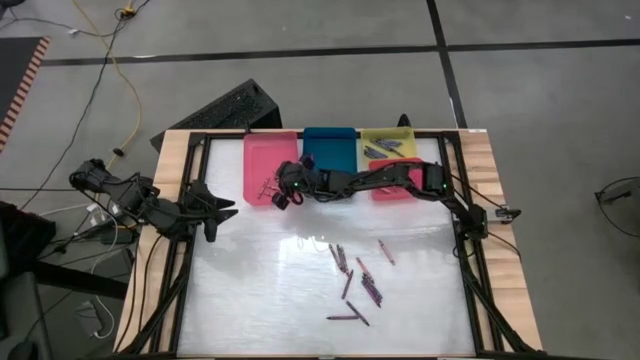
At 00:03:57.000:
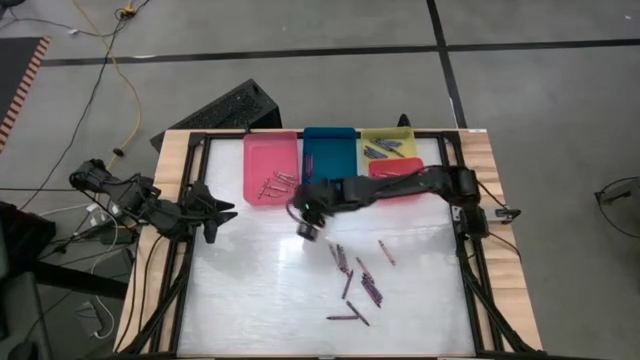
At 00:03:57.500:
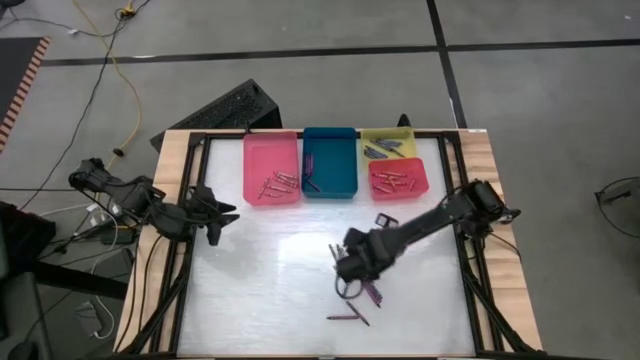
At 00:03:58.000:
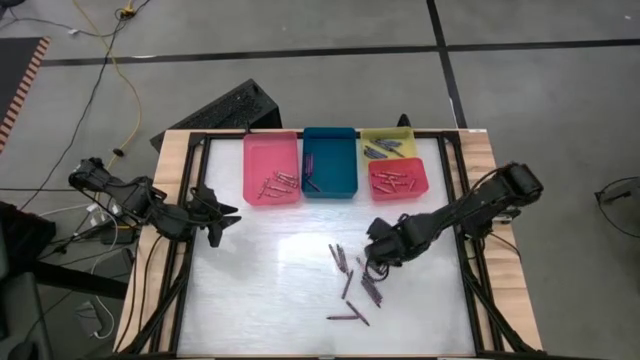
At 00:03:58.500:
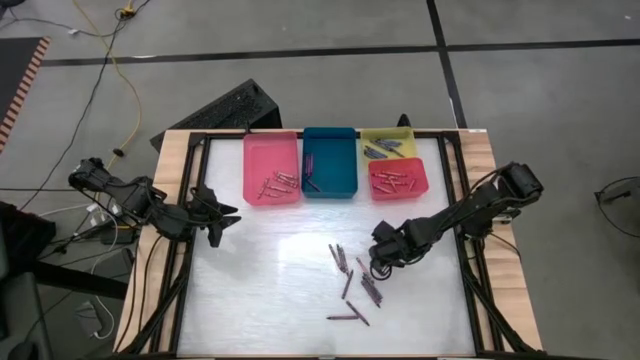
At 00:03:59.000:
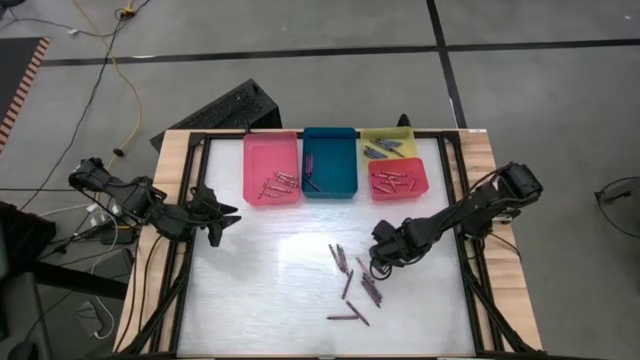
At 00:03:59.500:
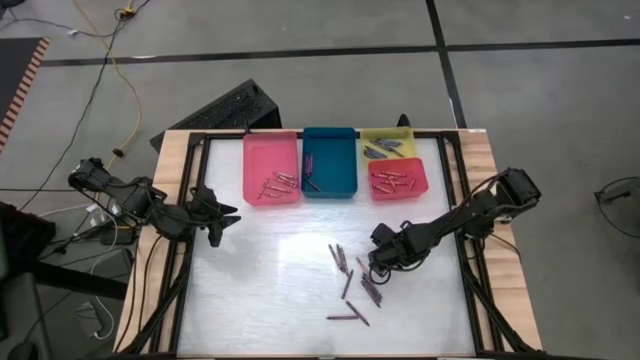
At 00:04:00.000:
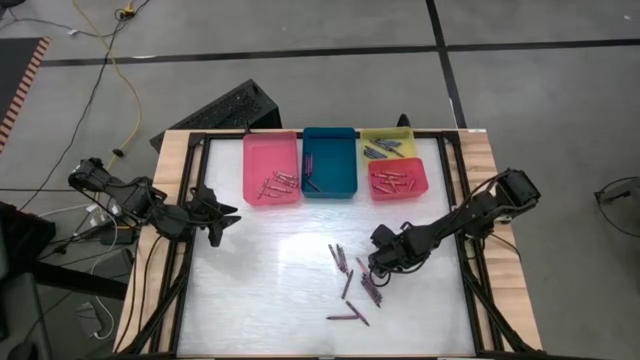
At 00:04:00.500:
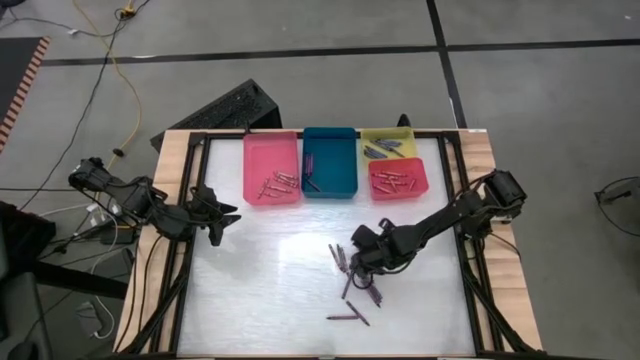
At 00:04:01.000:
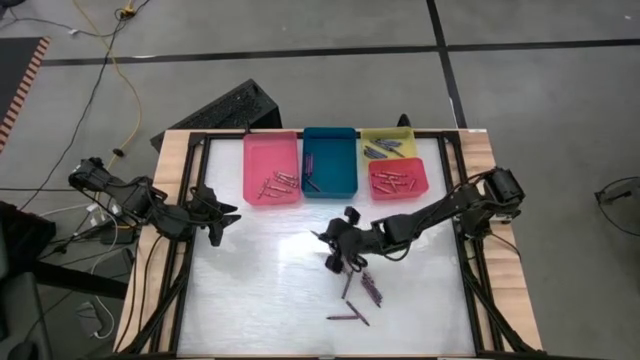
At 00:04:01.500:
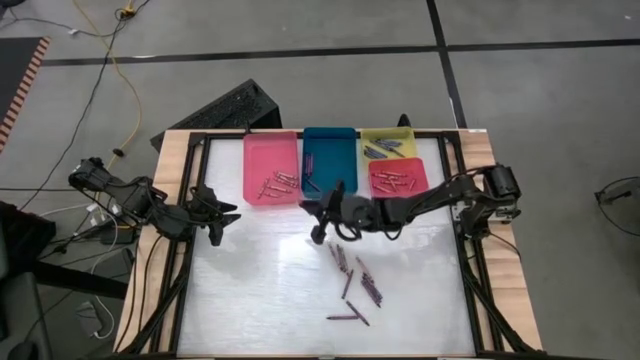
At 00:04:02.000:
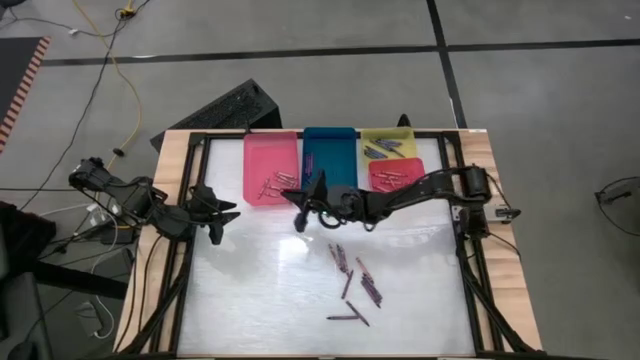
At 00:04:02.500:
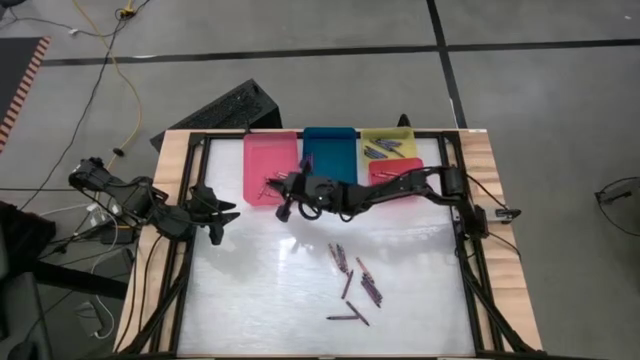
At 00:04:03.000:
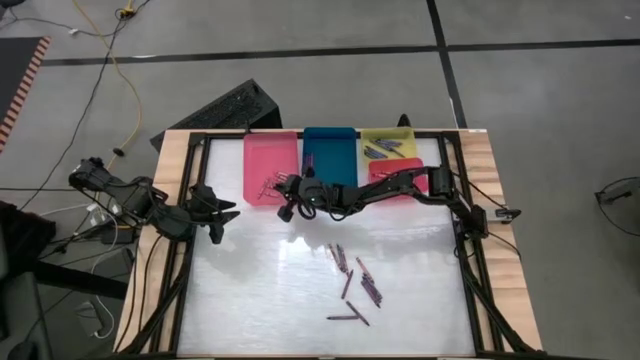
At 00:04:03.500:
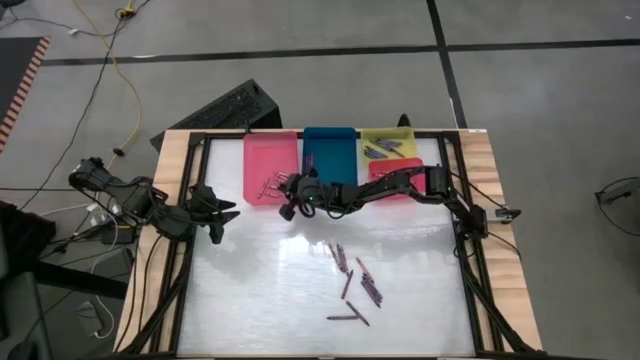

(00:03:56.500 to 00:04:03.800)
Task: Sort crayons
Put the pink crayon into the pink bin

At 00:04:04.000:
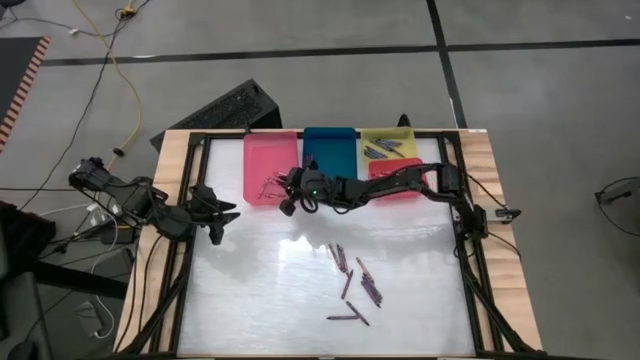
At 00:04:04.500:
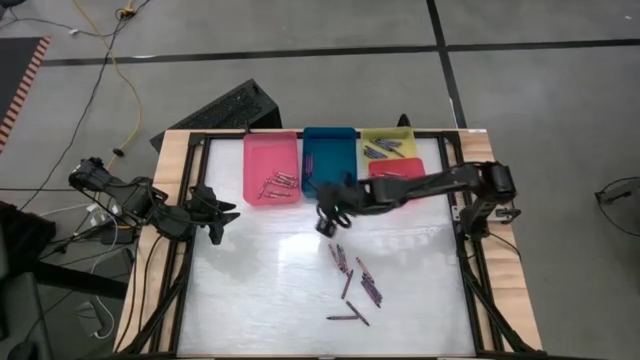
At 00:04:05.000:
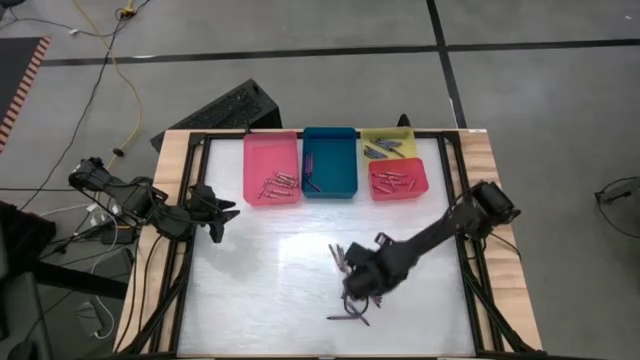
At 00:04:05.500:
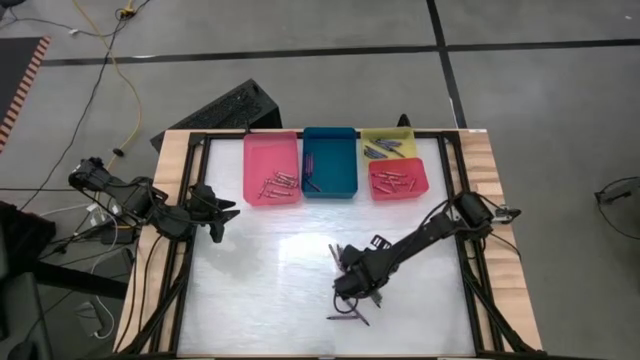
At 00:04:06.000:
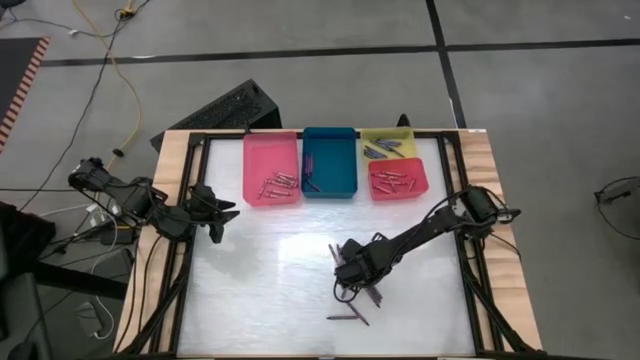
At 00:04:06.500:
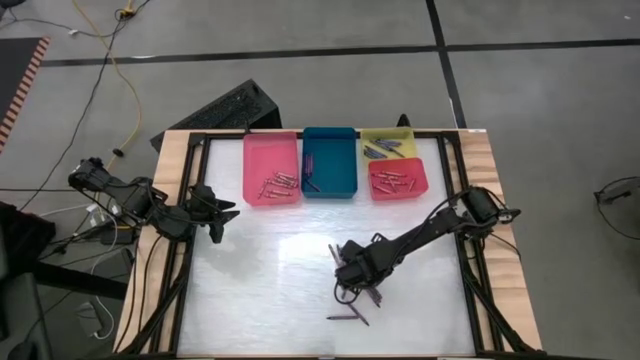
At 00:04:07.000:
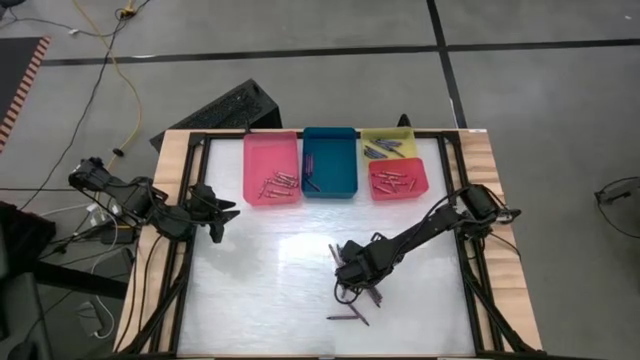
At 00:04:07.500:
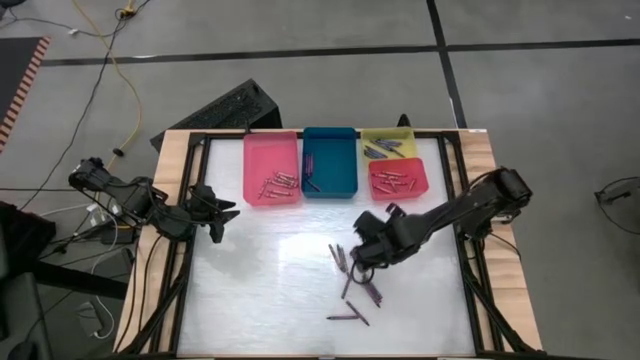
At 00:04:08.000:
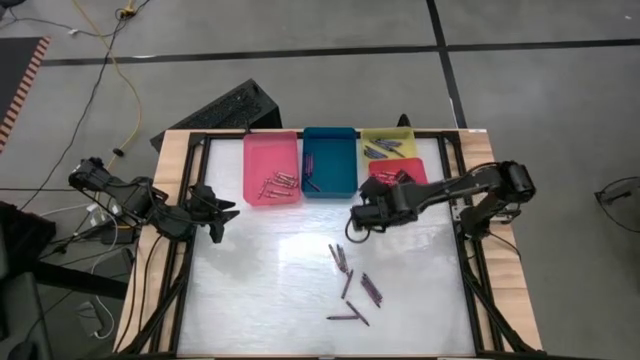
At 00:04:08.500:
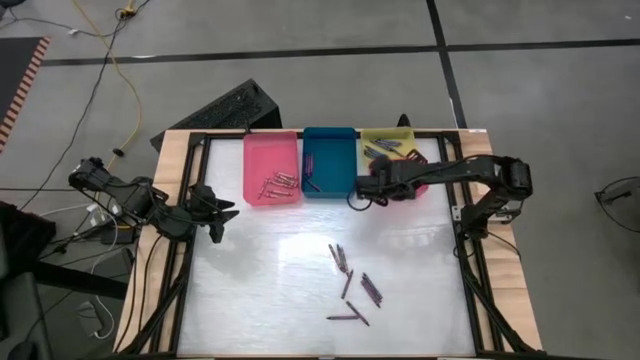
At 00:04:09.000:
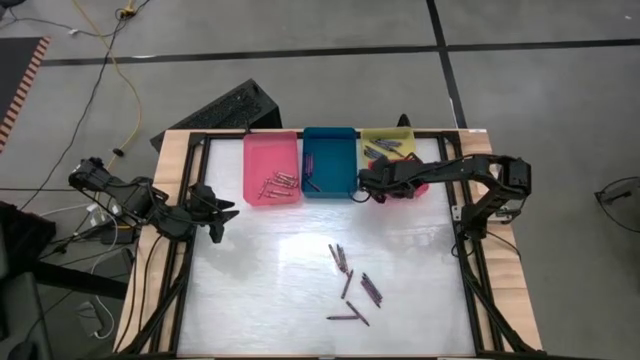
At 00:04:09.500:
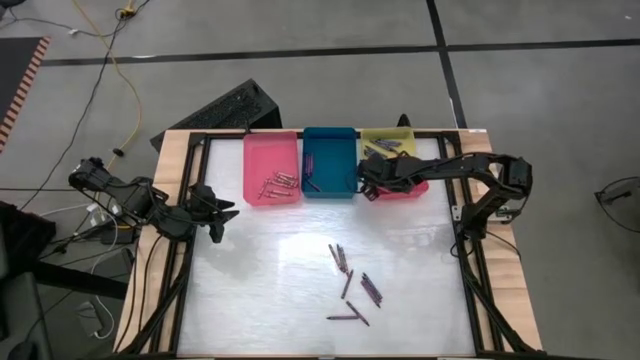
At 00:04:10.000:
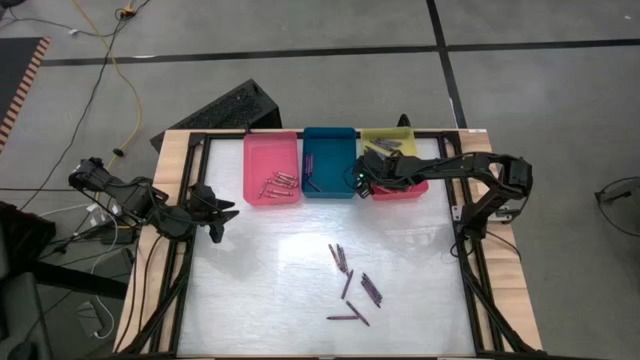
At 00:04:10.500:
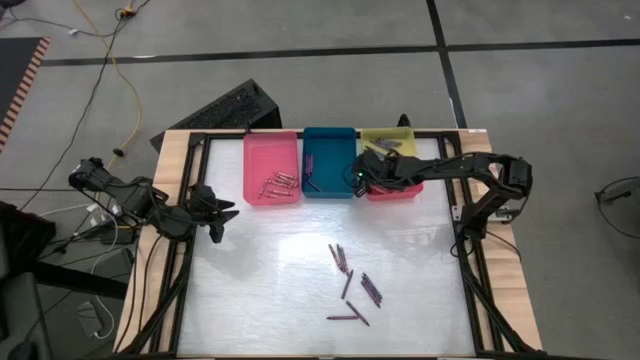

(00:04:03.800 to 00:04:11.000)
Put the red crayon into the red bin

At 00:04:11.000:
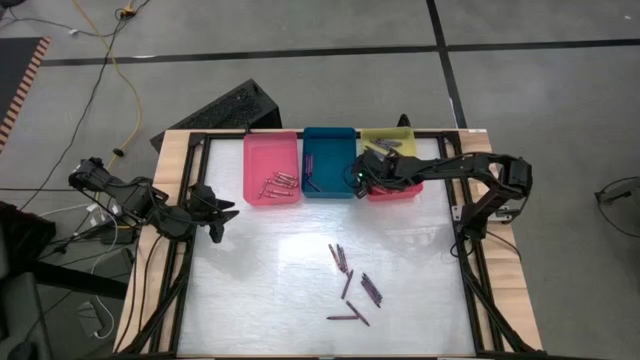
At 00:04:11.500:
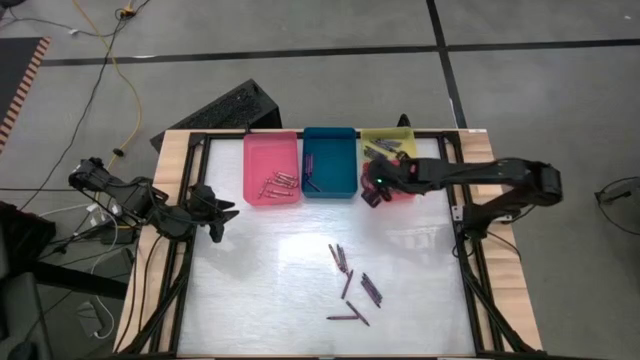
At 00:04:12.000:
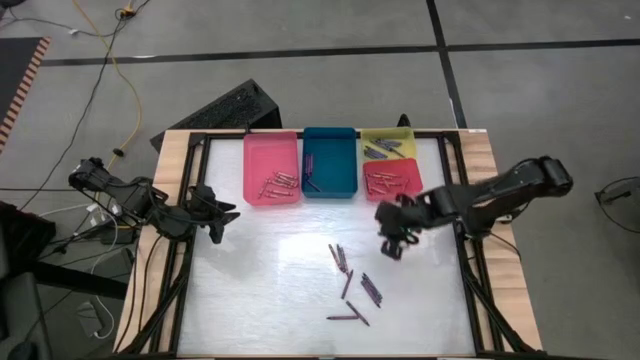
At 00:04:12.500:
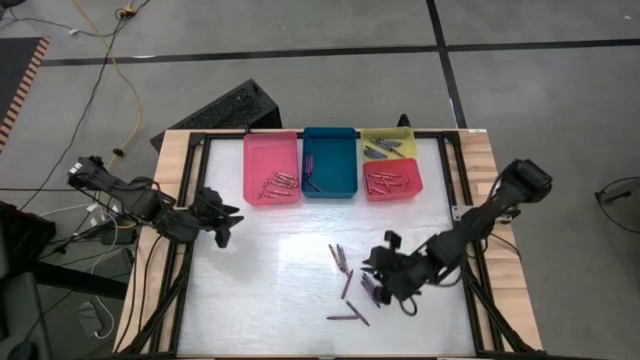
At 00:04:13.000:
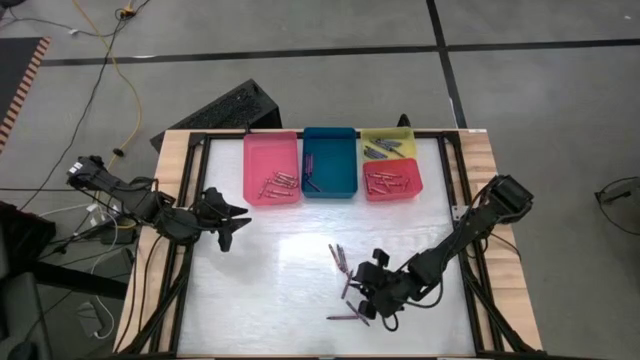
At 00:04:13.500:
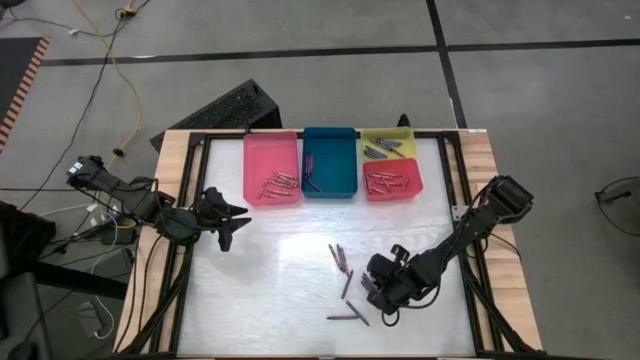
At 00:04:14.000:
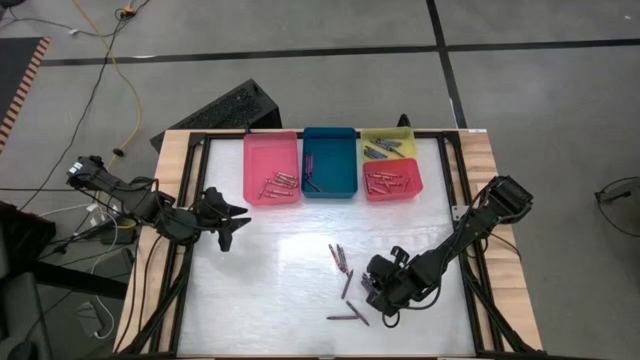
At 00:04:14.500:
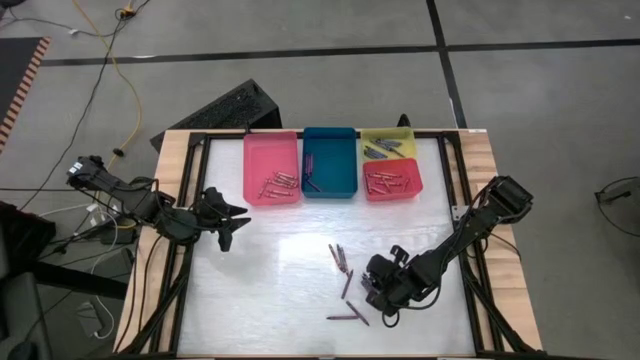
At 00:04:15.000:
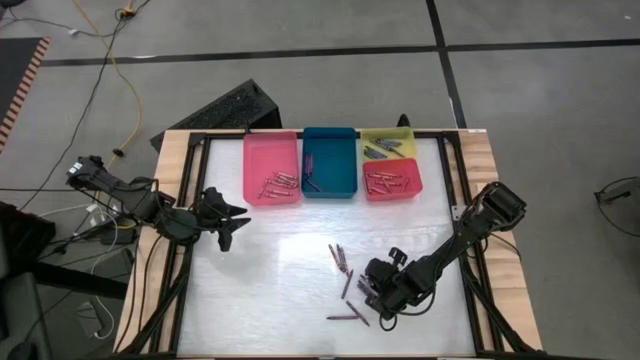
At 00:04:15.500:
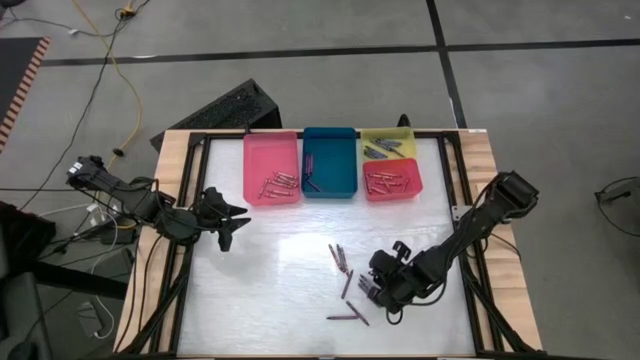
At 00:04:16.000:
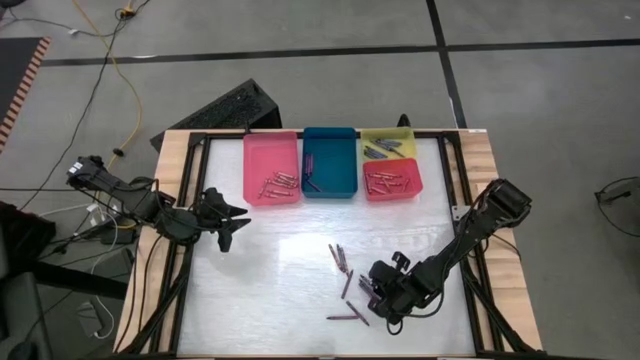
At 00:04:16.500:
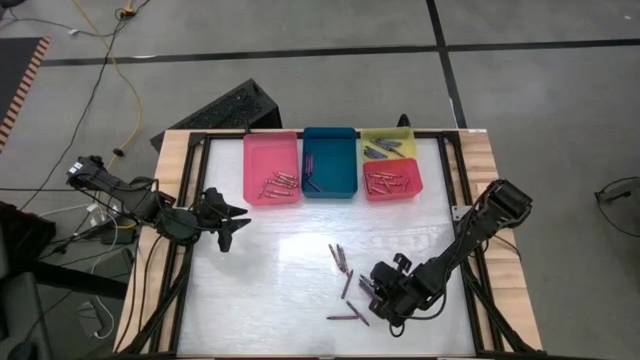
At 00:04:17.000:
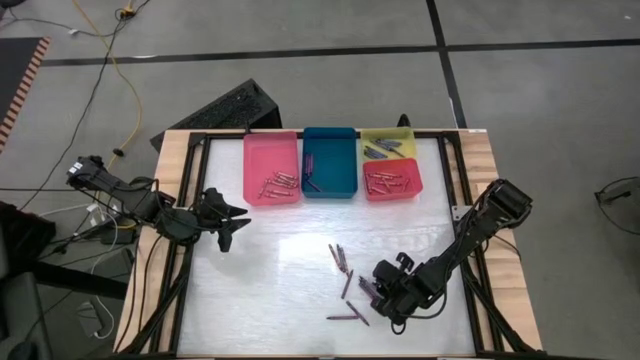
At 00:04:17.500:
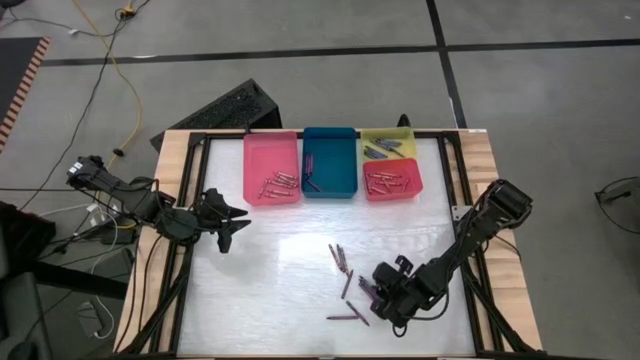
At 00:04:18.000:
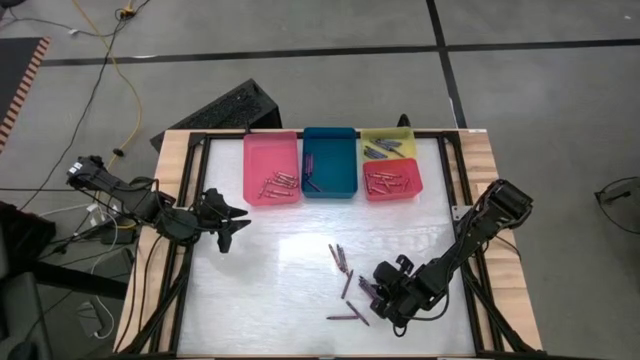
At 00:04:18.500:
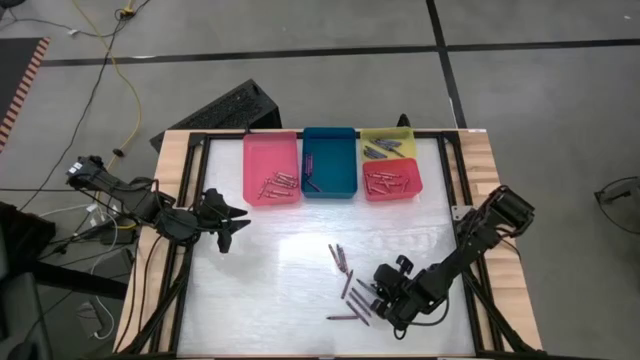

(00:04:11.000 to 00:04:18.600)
Put the blue crayon into the yellow bin
